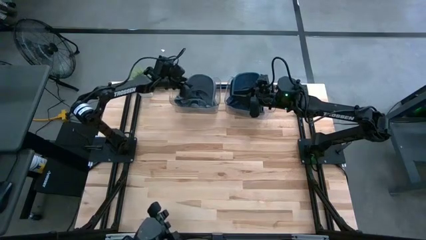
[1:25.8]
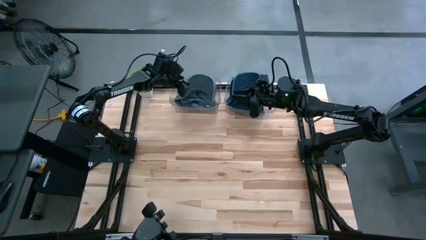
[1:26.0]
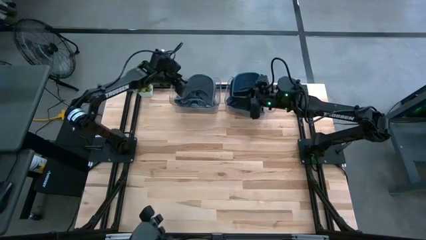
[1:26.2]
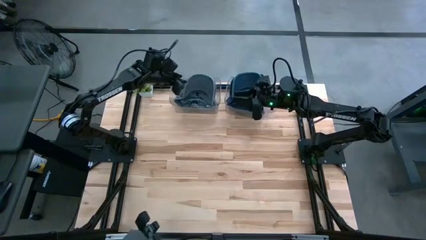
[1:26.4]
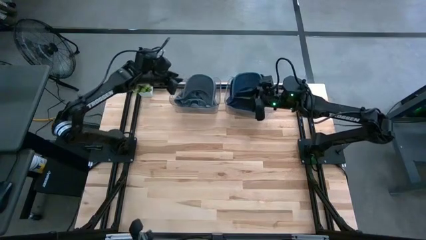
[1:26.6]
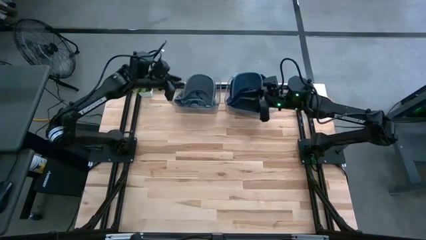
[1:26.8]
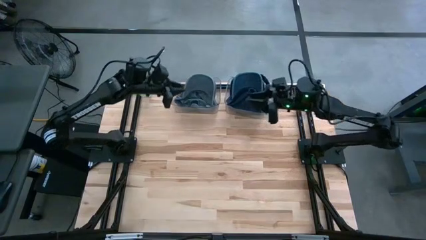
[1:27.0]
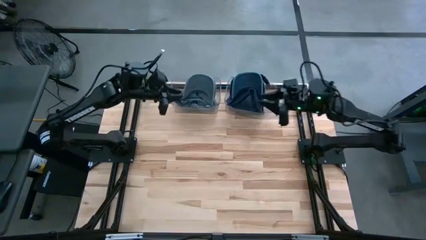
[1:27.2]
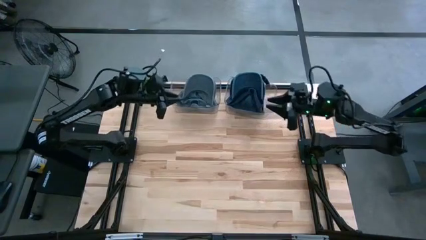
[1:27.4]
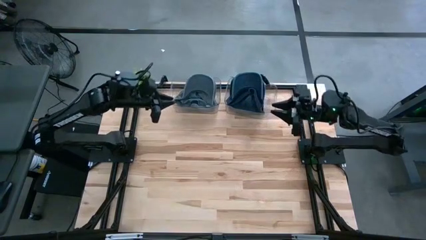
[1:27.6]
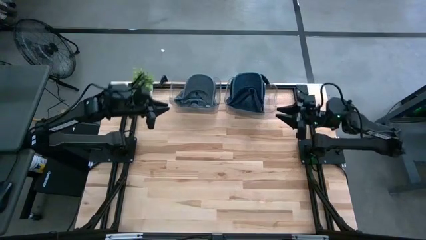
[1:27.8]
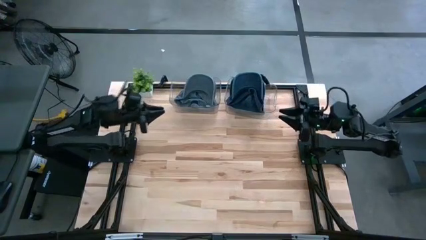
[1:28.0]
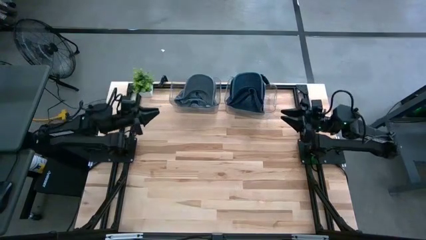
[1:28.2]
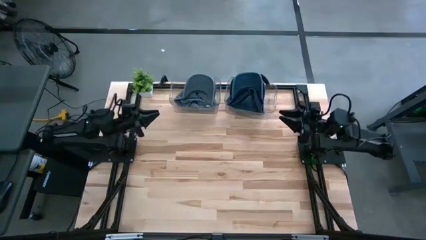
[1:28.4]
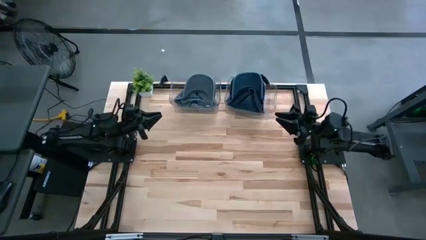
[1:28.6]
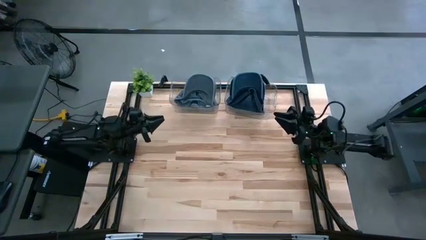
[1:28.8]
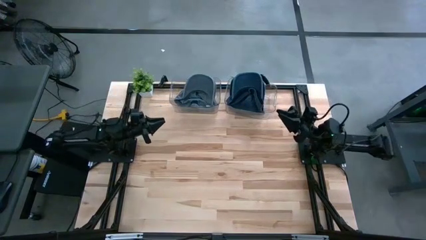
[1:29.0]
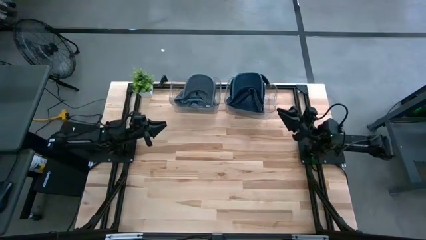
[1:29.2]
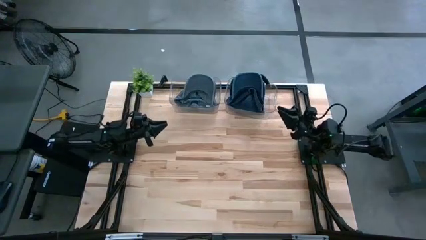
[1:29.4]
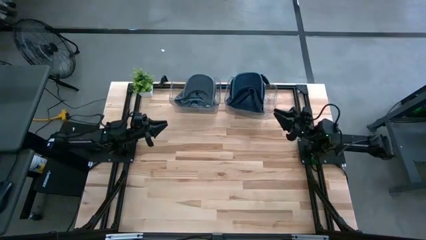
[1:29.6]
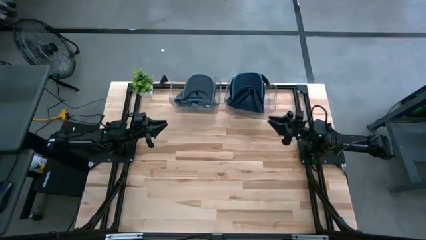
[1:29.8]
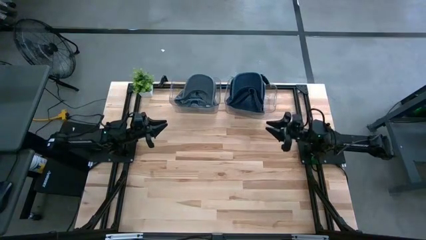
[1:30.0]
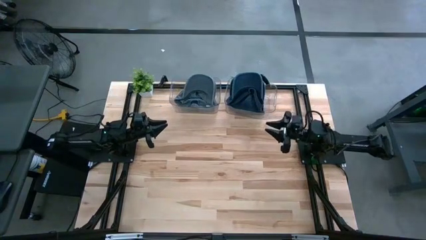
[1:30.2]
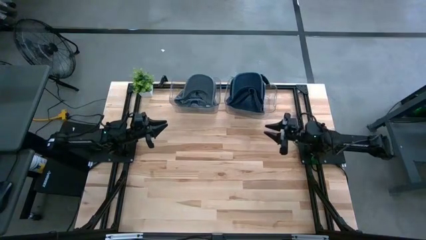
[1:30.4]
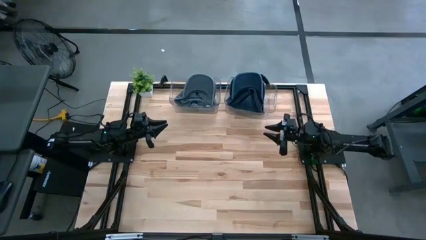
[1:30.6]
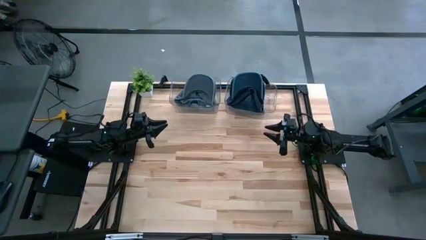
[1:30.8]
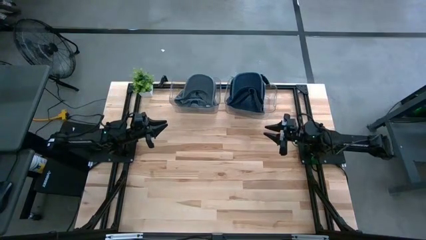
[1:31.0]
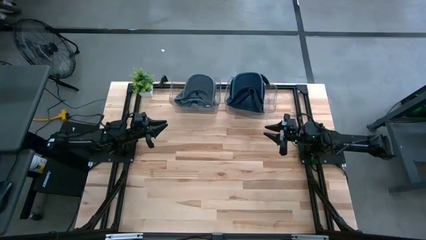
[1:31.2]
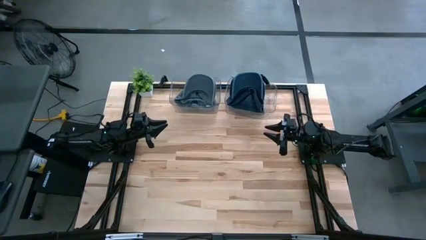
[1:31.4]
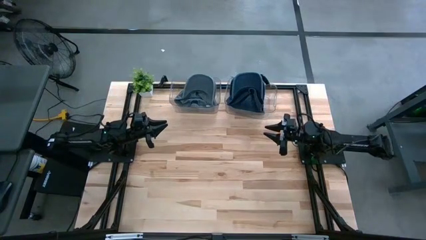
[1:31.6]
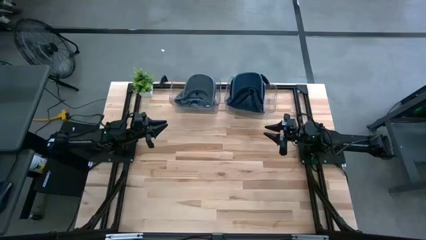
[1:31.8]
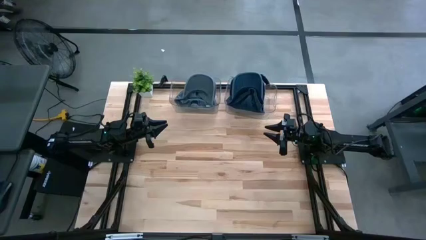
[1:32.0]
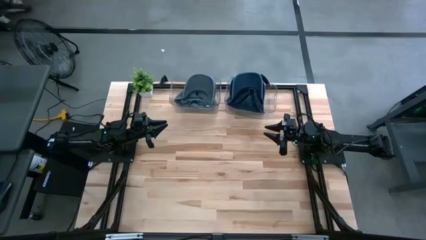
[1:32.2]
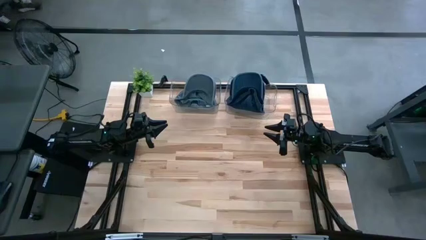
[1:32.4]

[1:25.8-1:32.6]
Task: Pick & Place hat
Return to Home Position

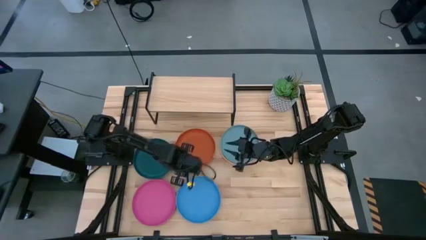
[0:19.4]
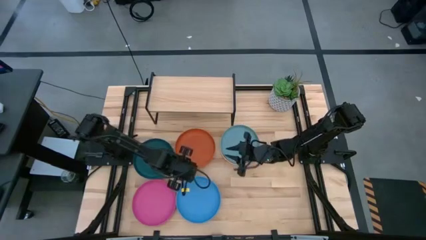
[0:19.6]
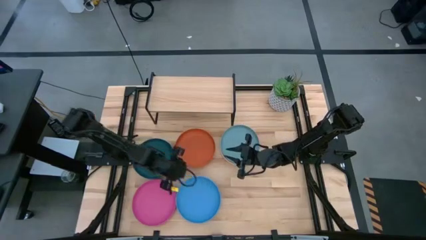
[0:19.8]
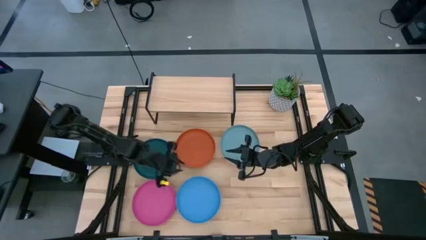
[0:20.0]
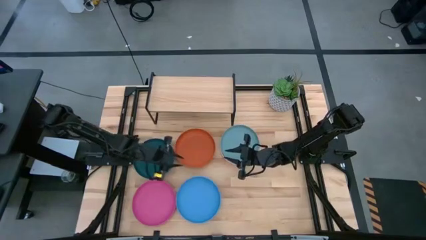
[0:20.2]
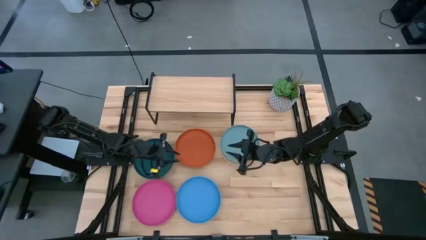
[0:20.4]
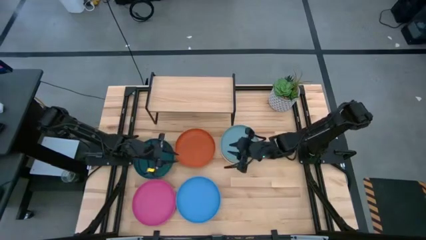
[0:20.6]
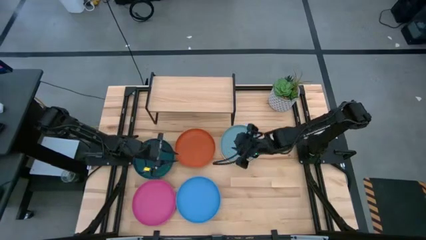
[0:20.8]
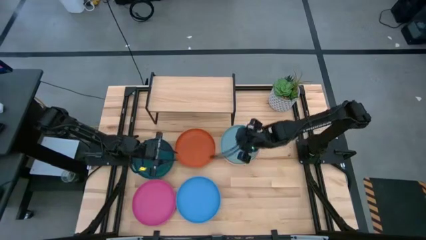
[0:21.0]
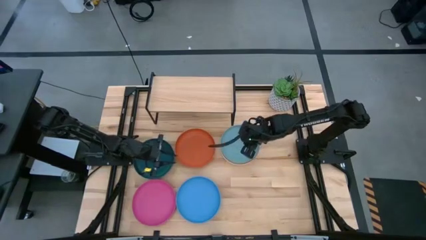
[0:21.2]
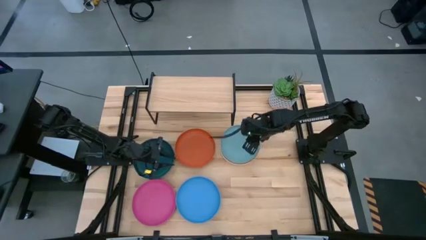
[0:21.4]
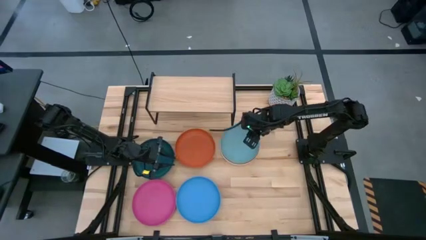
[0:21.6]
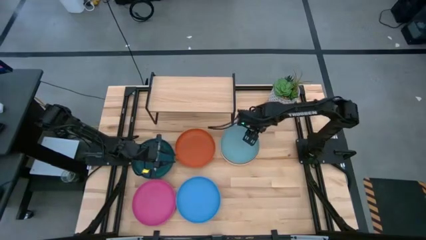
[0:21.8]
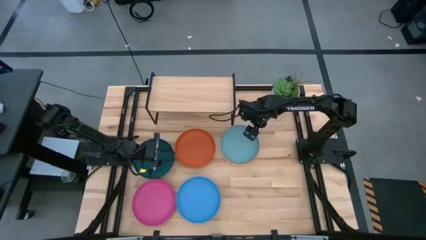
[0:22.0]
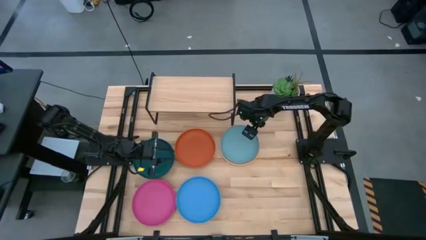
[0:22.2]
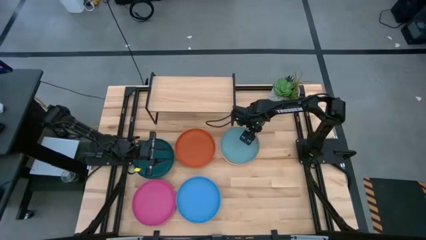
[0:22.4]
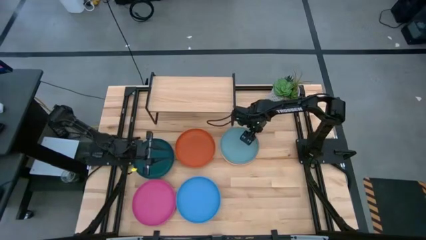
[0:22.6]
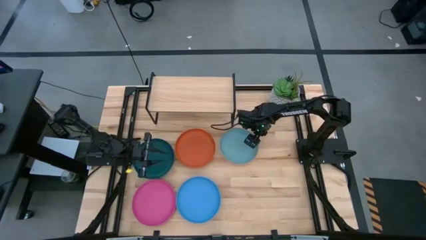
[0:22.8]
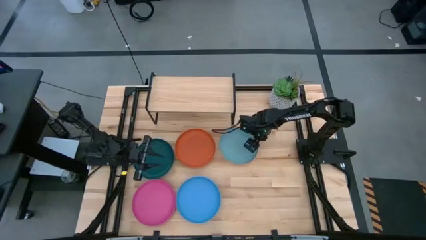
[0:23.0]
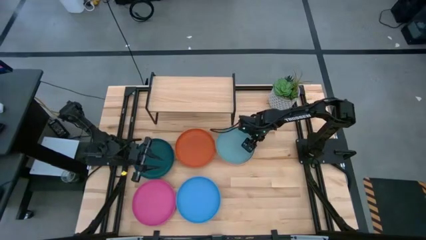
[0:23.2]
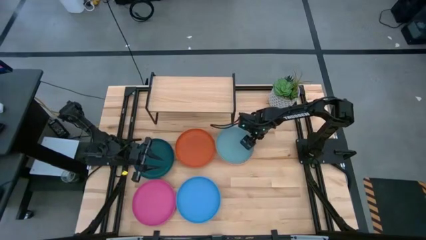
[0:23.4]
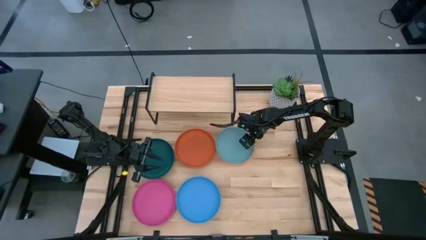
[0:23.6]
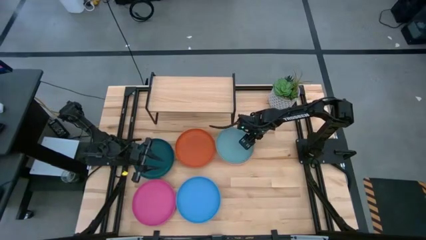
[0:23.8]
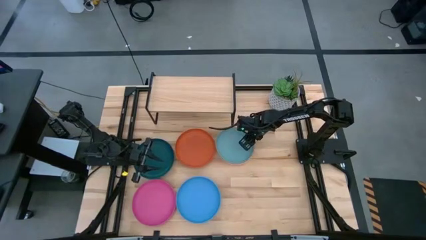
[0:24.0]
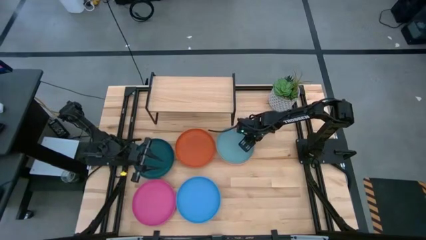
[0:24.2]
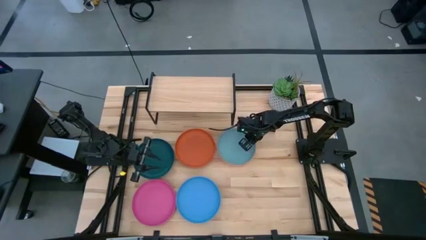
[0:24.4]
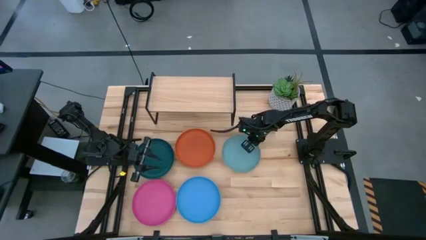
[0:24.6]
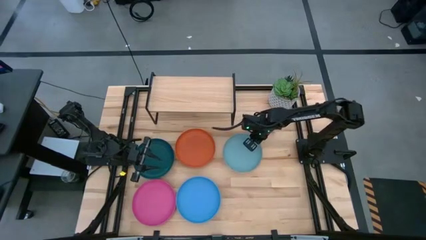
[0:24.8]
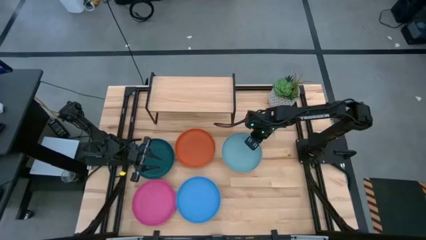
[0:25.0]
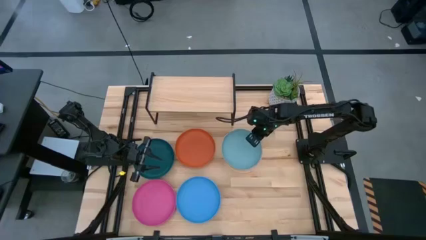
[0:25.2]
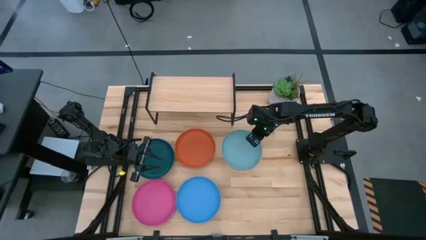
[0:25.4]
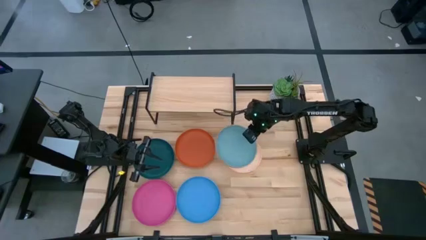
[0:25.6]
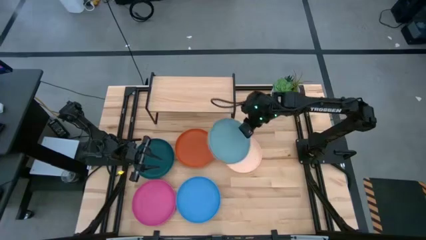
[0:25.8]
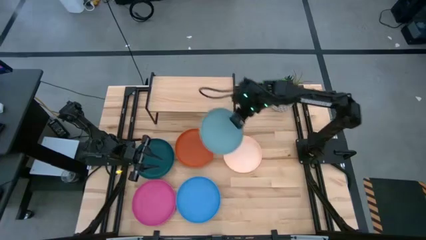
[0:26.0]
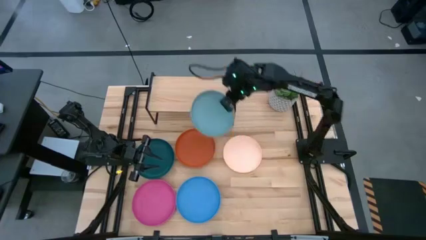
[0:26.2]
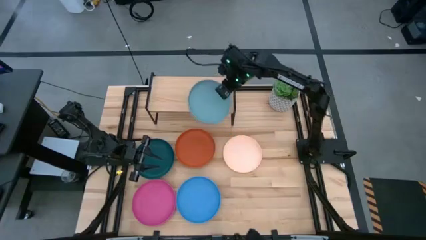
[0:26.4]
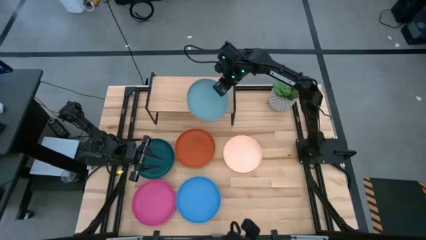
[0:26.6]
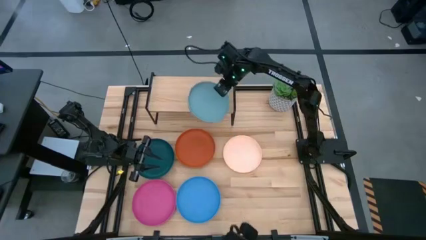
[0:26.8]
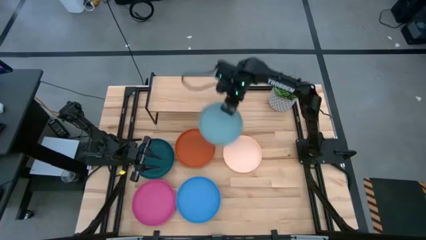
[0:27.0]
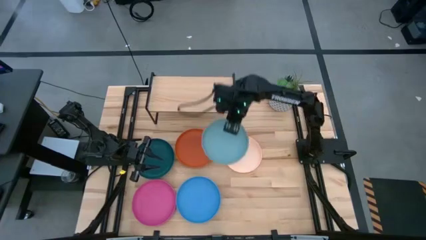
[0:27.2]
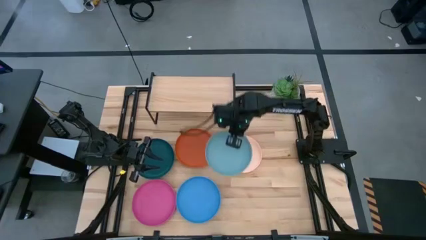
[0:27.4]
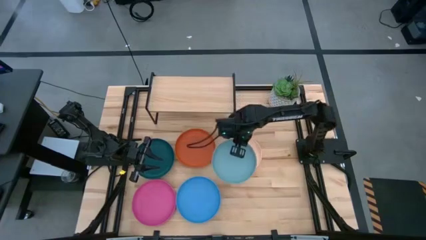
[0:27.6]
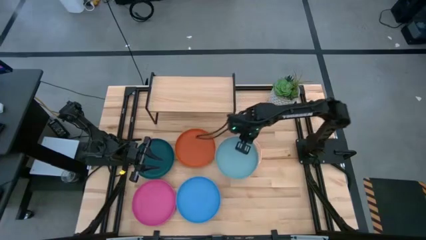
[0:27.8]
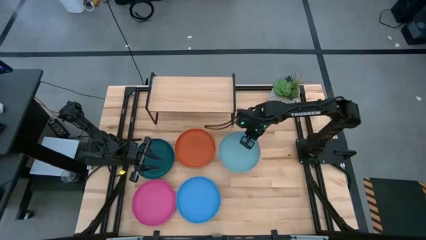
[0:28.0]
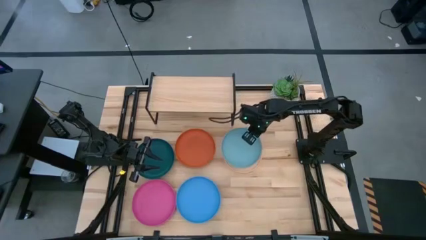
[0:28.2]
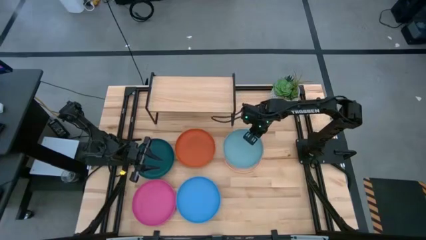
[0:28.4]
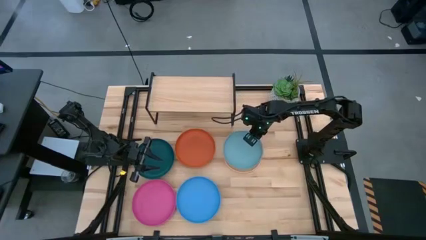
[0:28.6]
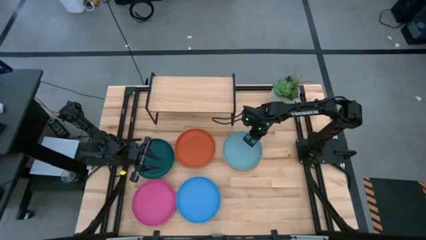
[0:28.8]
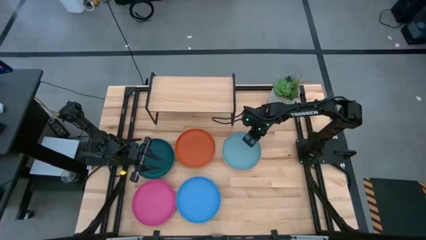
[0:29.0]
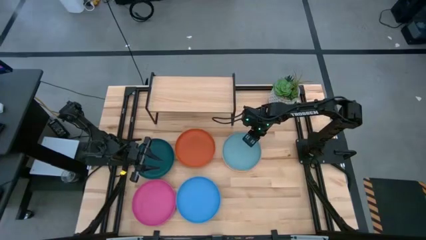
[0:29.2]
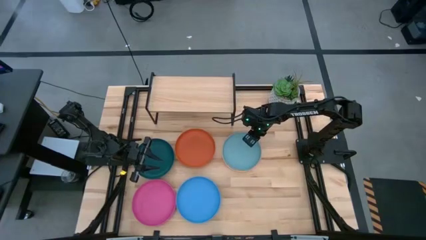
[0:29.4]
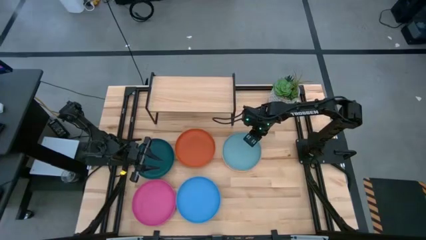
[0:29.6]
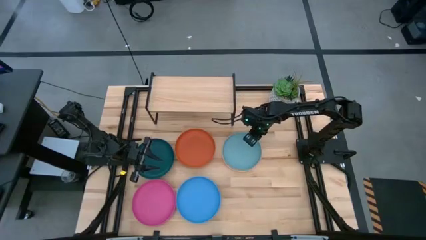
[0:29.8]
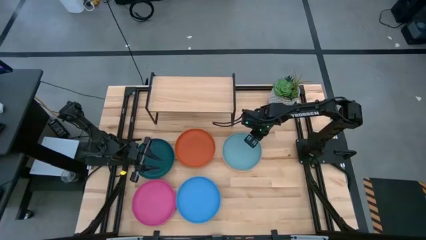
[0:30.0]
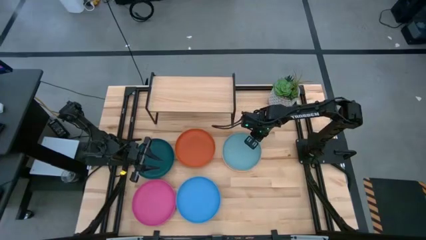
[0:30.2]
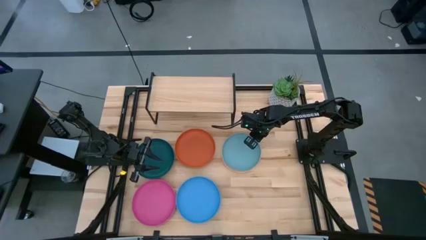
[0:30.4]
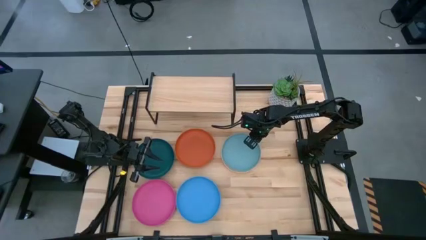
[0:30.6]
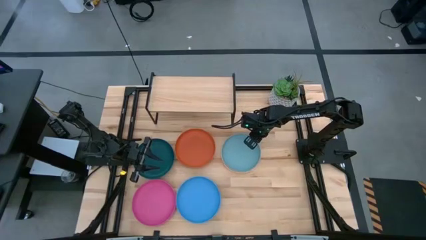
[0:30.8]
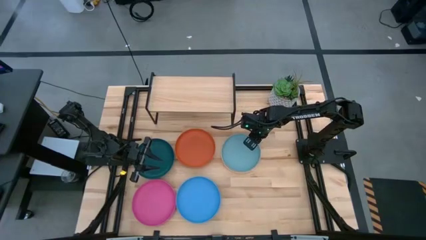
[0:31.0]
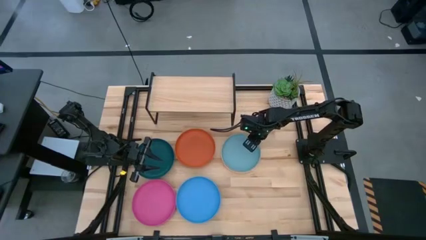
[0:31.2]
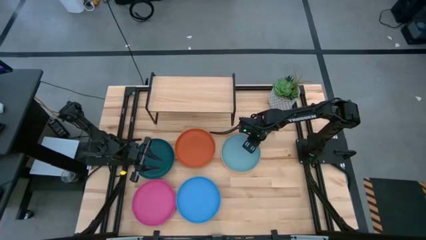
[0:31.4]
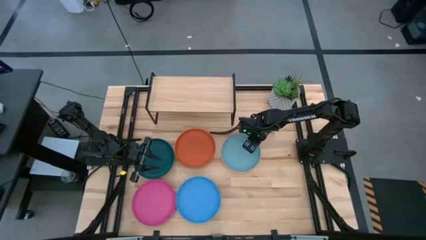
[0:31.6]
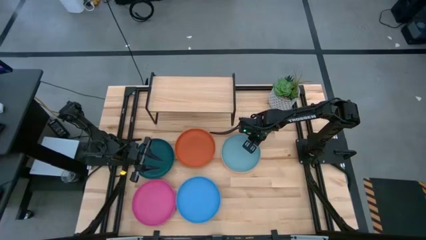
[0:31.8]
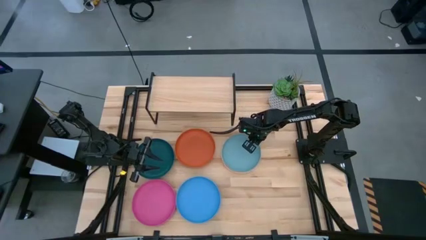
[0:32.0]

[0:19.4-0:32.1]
Task: Place and stack plates onto a shelf
Put the light blue plate on the shelf
